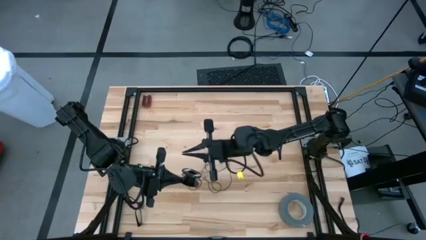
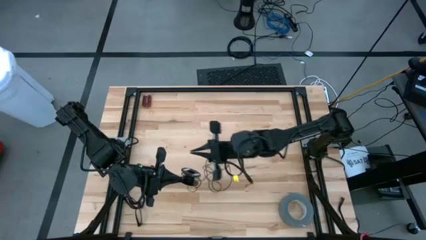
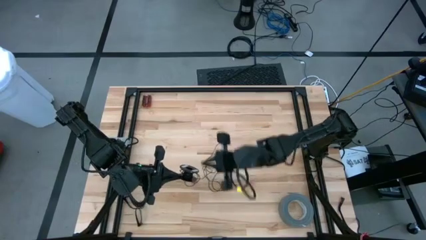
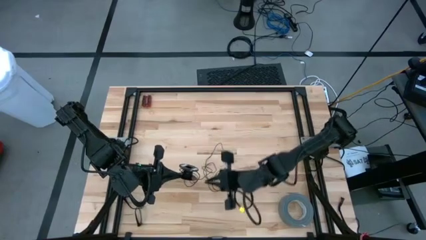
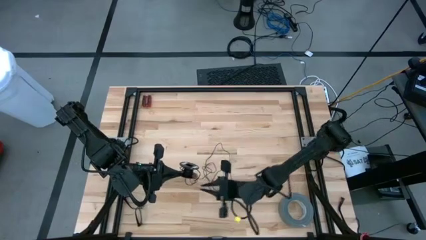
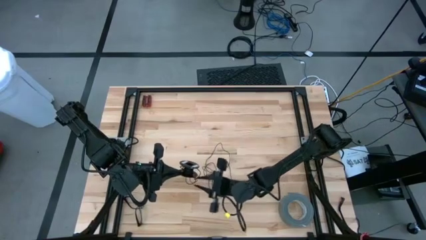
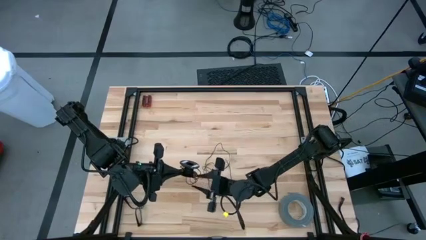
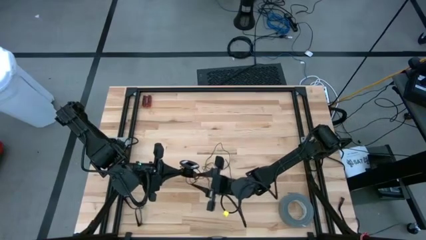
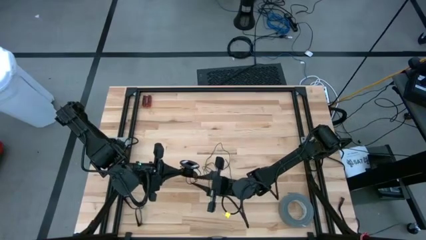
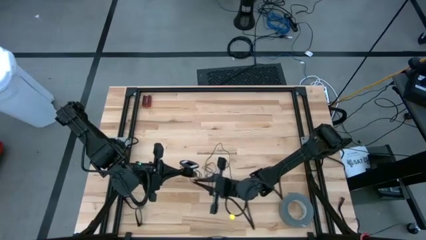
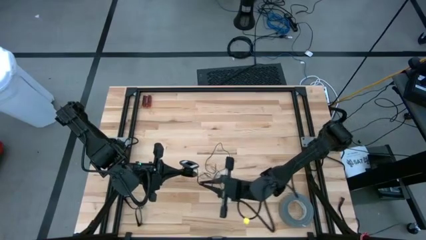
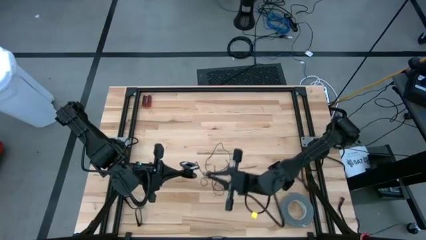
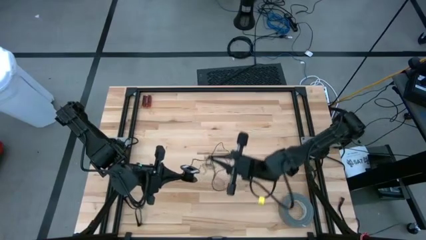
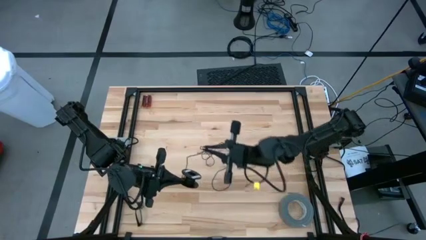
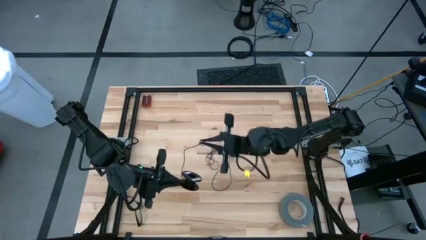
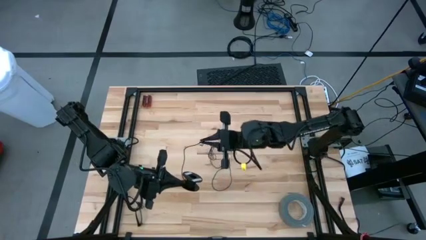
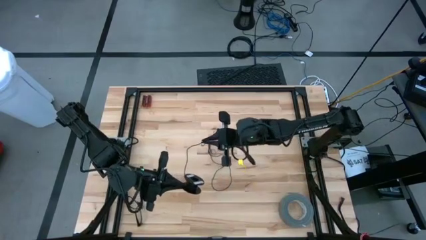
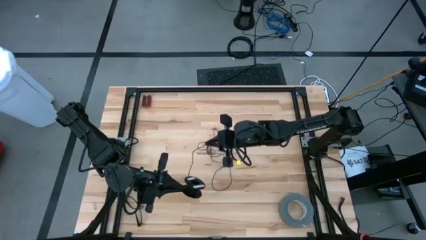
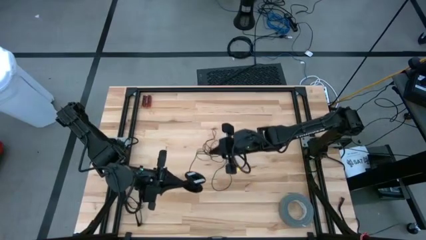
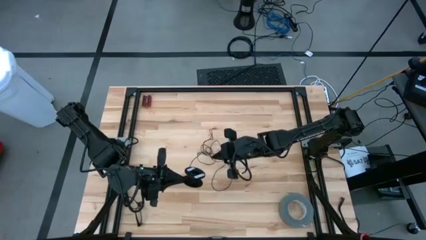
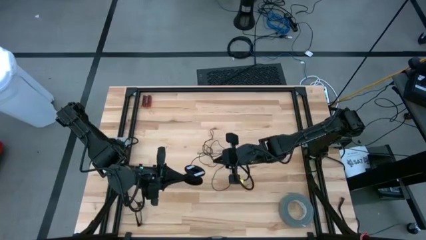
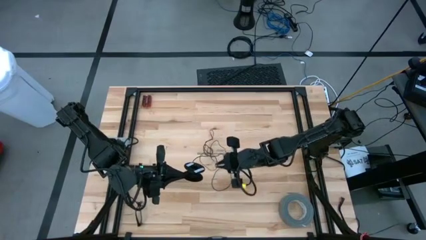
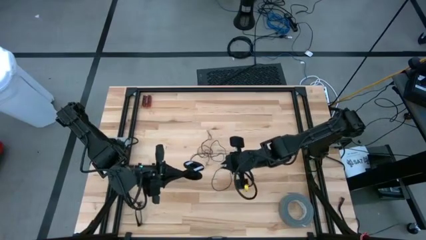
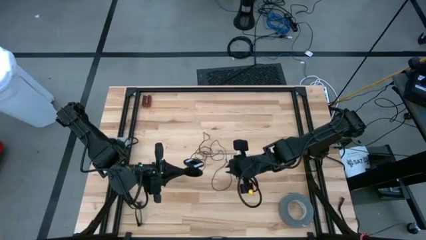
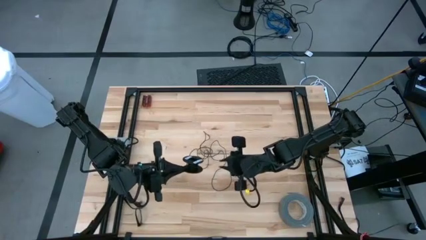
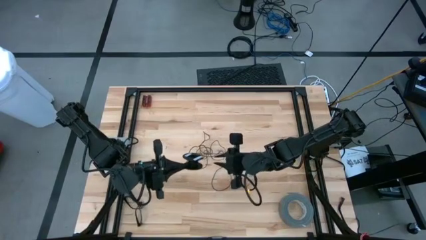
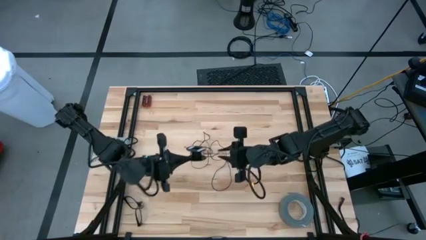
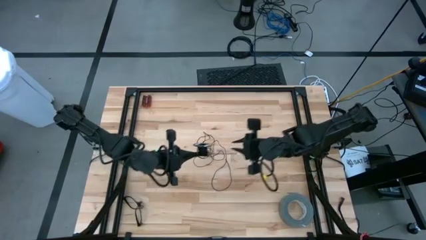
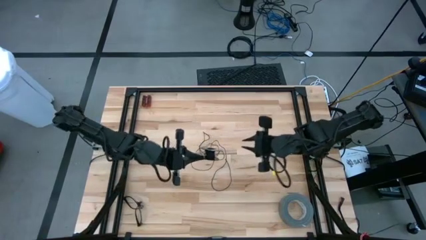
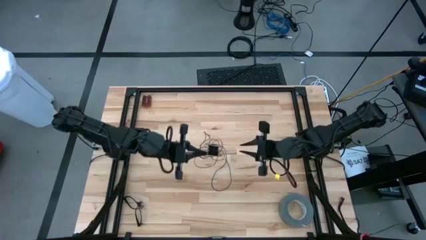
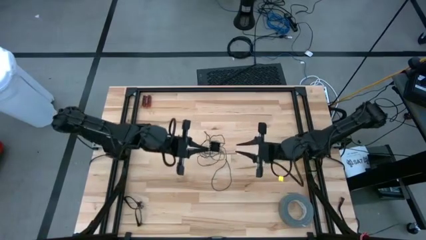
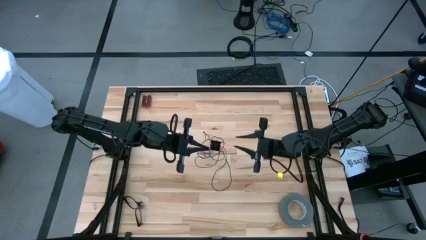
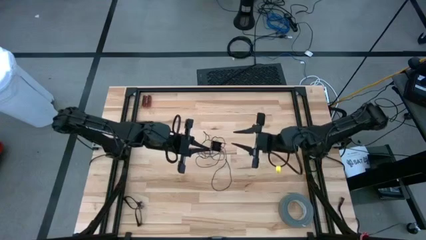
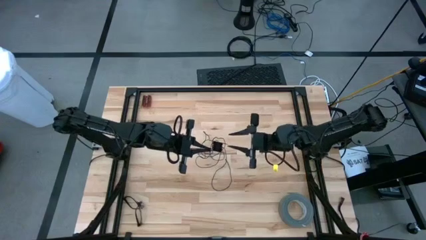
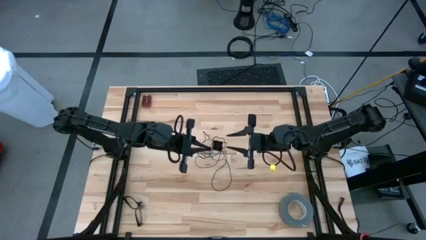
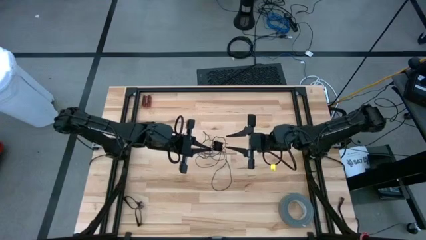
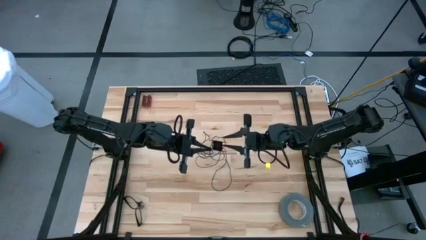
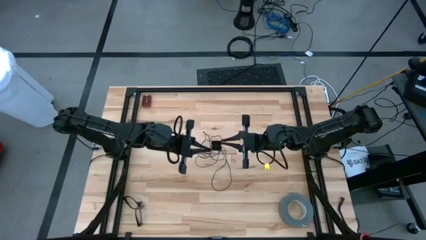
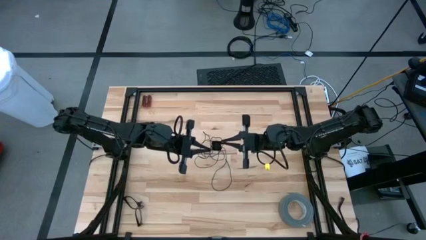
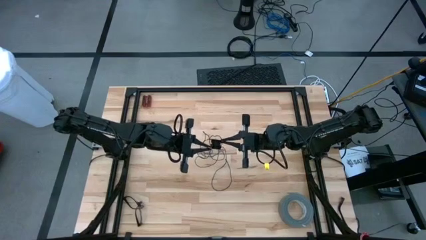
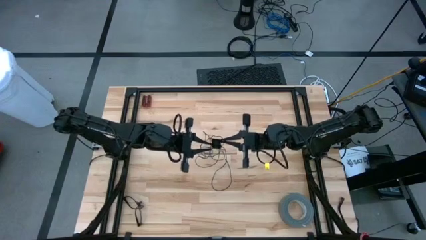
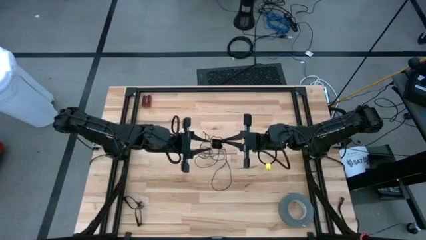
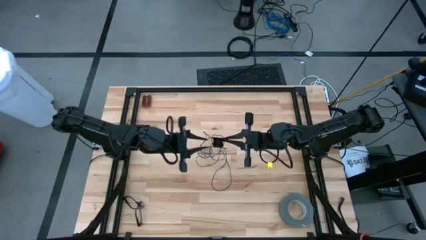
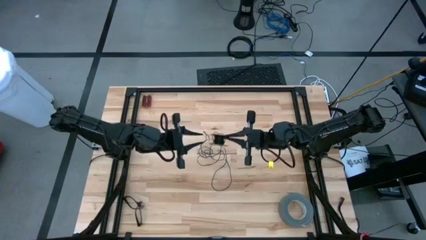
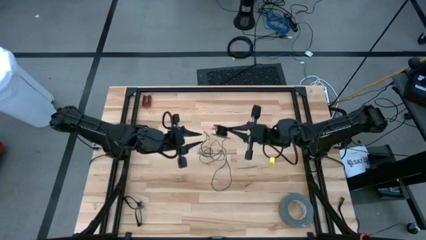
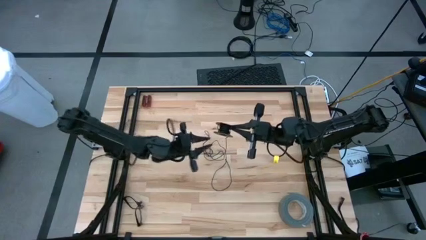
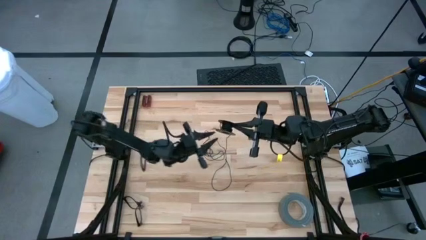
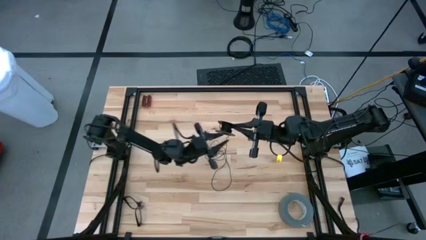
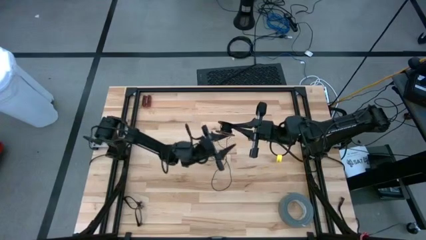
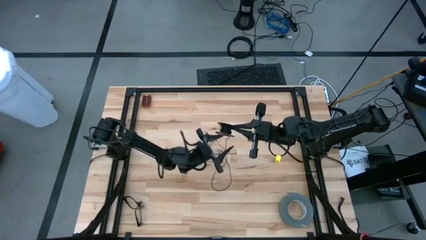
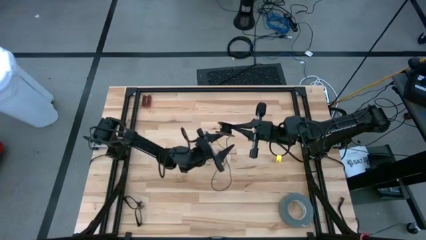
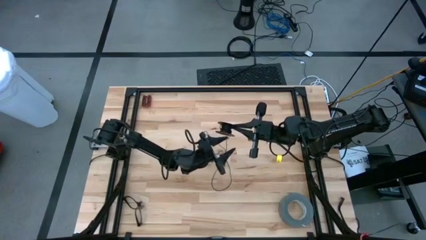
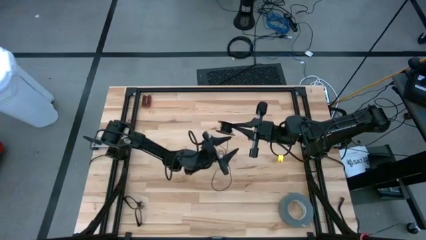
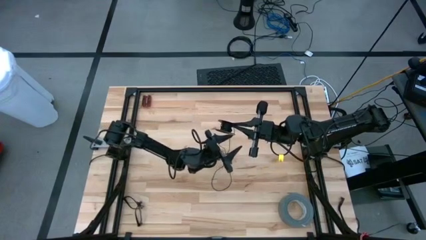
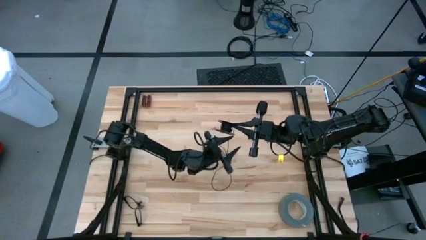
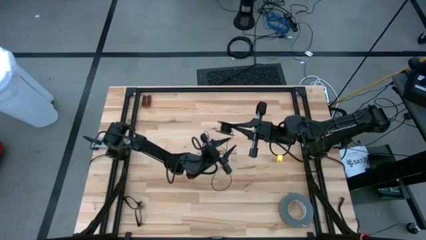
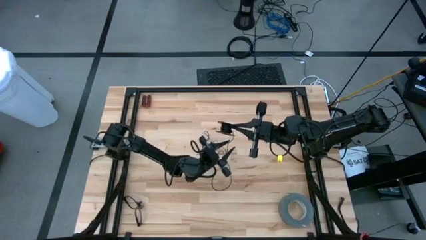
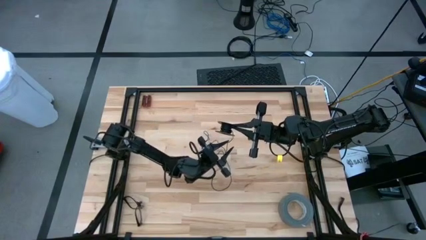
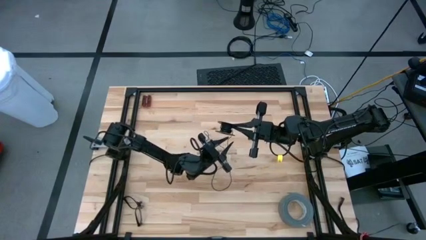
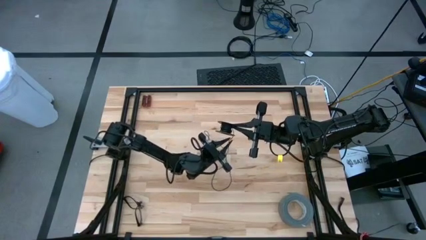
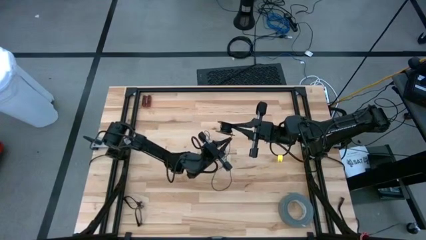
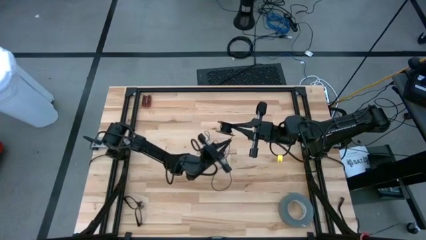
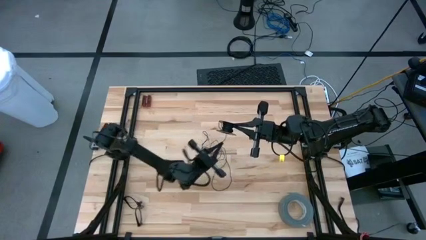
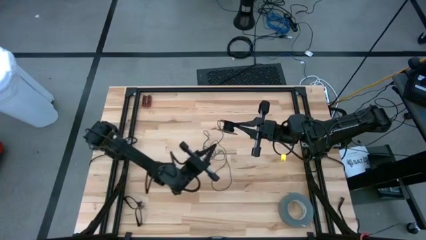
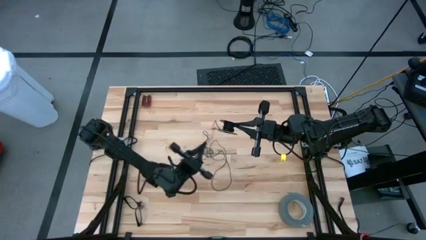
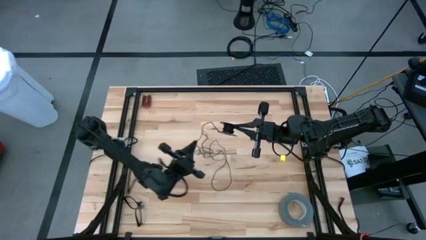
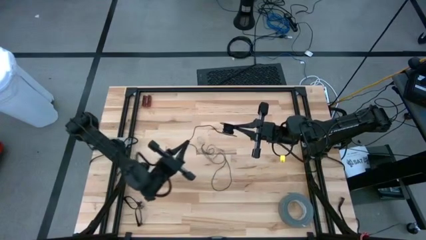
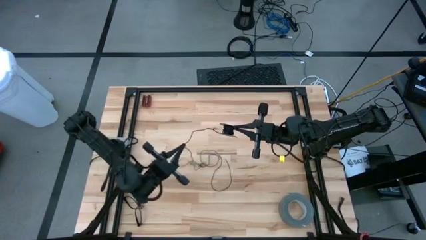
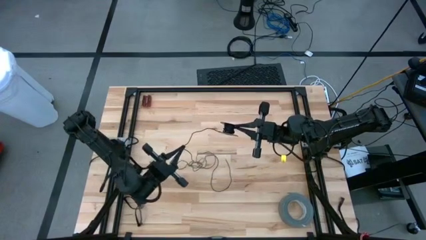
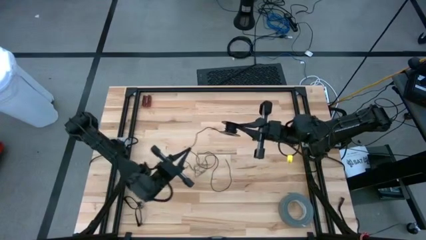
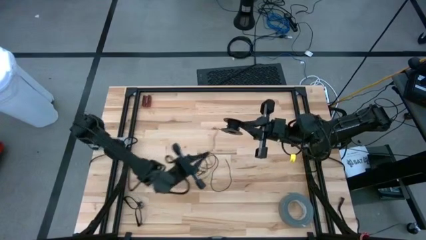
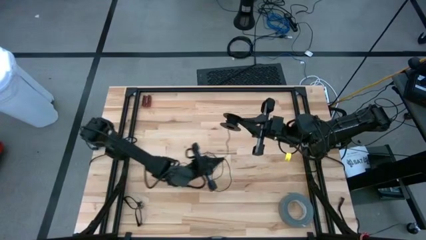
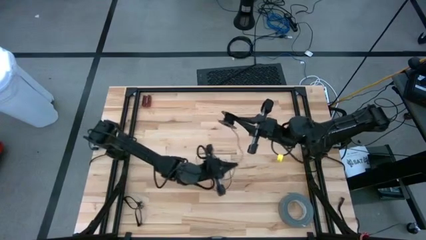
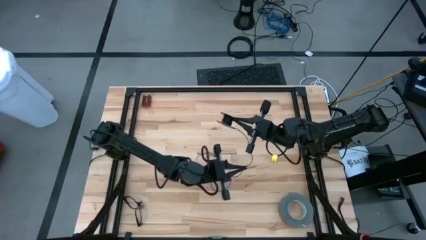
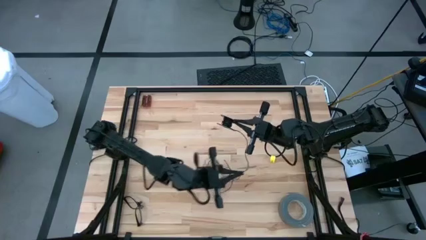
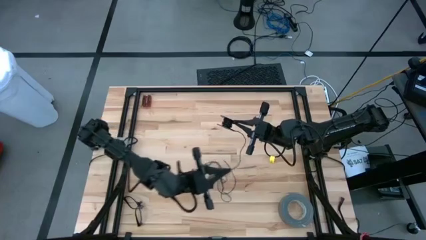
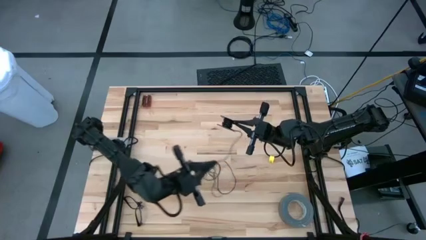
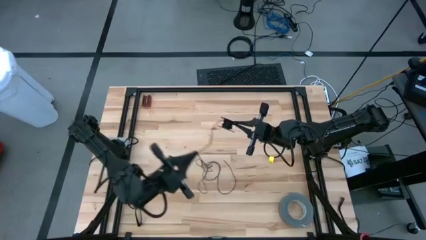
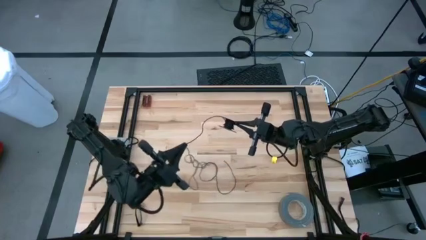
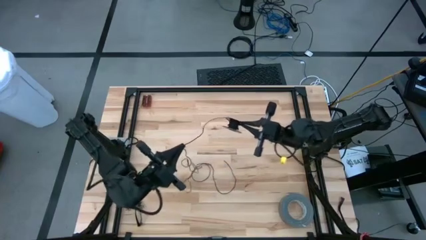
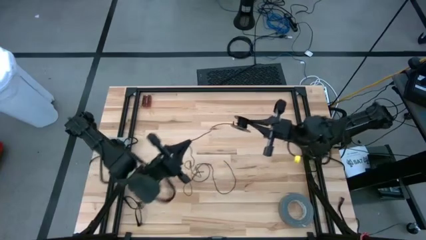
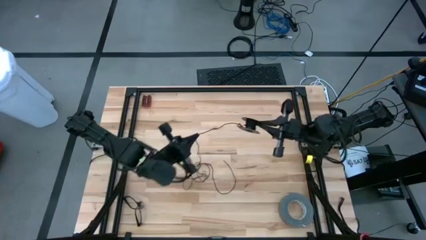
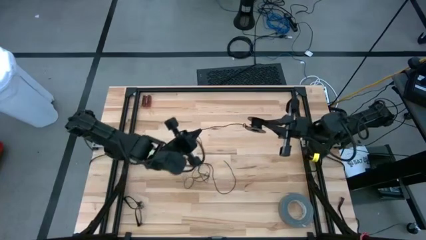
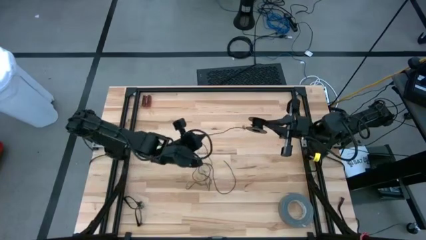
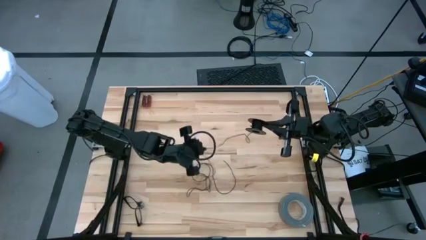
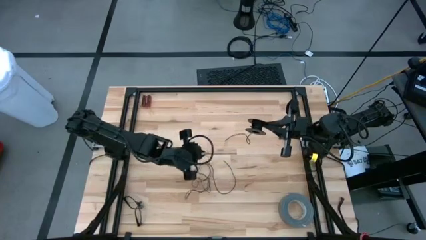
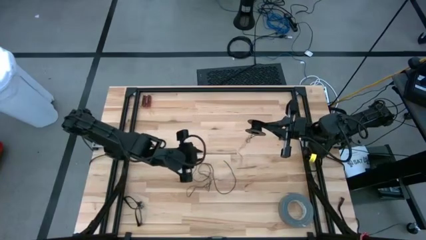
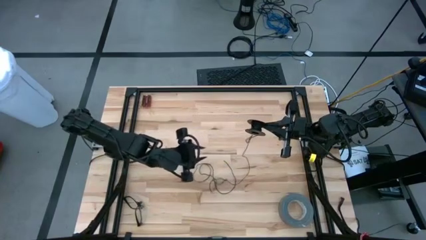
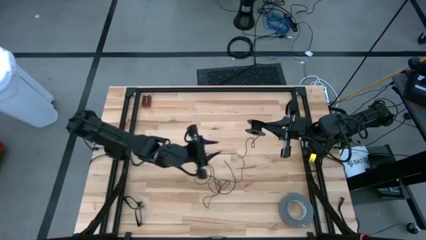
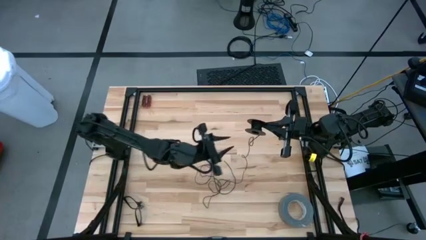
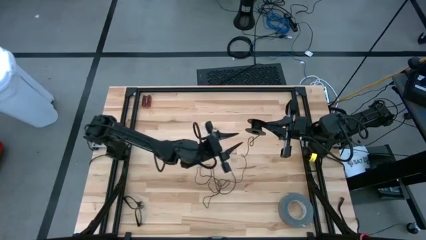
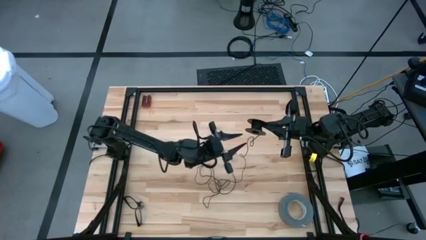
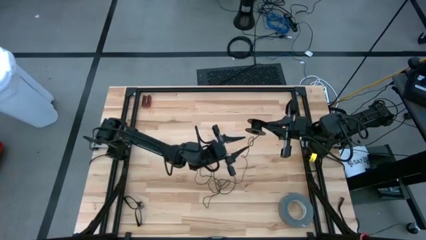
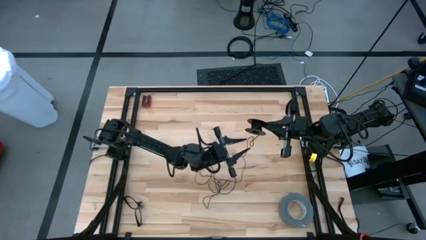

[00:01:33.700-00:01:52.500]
Task: Coil cords
Uncoil the black wire from the spool
